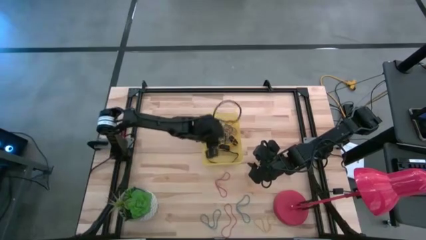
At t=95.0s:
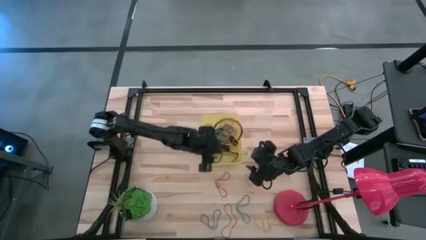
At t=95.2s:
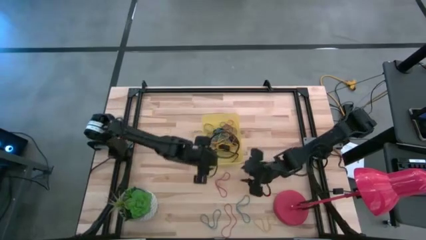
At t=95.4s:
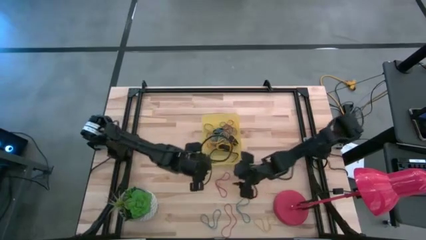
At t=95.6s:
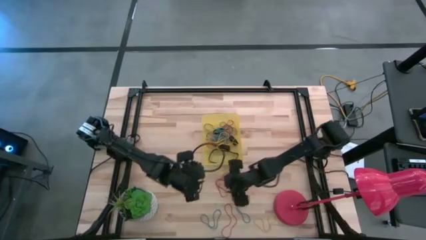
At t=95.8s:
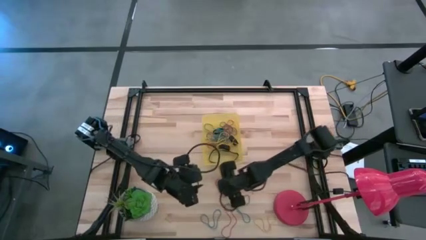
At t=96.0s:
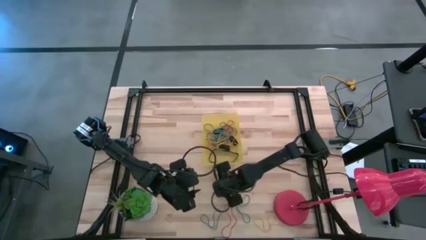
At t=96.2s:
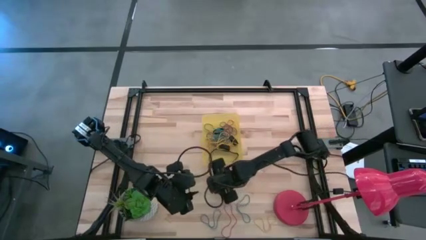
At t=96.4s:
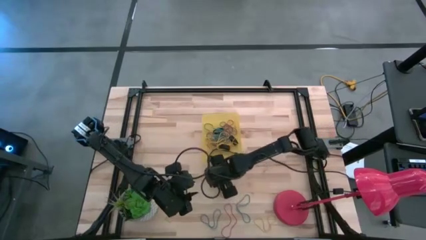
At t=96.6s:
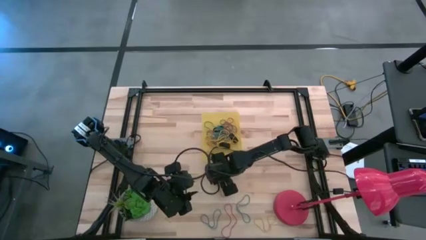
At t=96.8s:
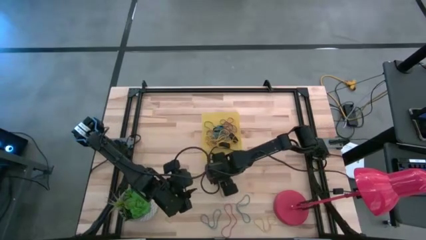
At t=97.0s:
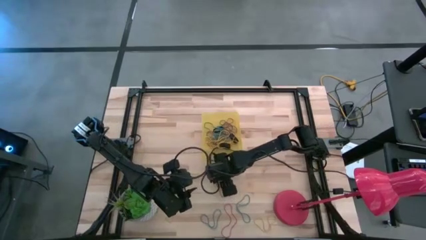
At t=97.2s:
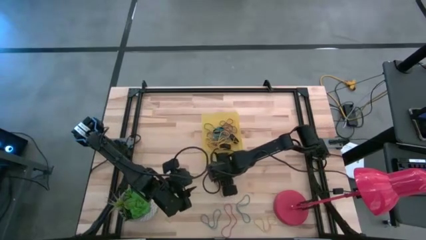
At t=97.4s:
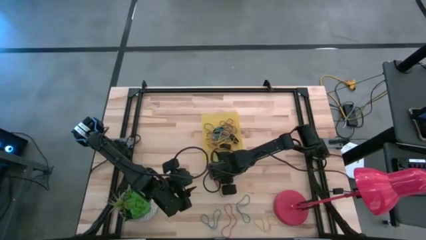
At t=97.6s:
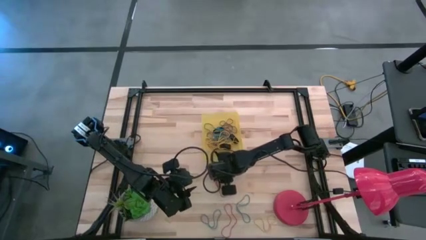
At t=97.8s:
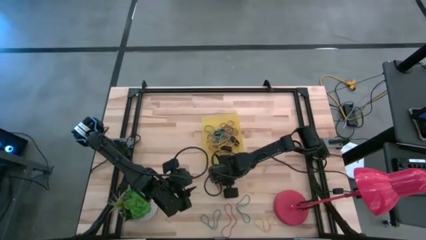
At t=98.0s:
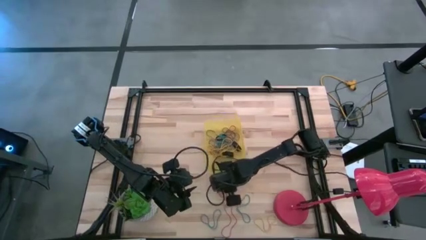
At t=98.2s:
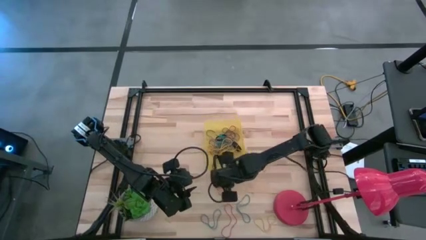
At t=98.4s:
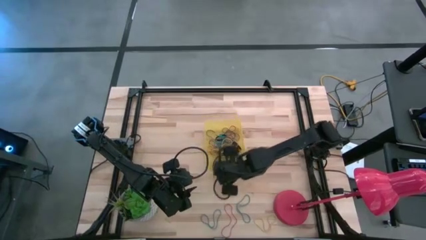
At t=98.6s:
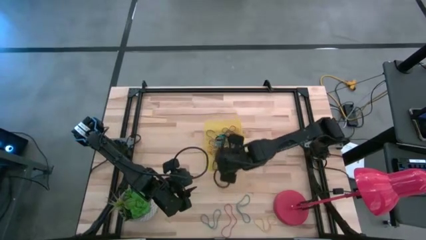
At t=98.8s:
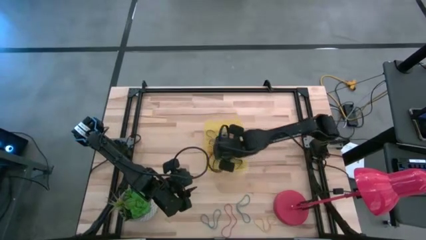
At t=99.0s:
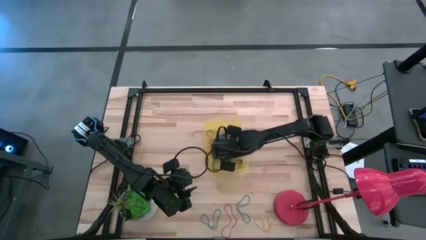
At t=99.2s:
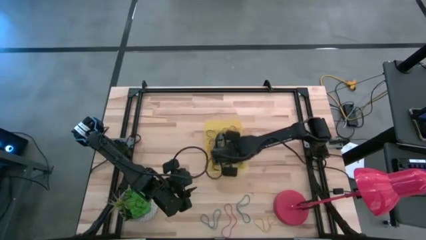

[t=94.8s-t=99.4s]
Task: Pick and place rubber bands into bin
Put the top red rubber band into the yellow bin

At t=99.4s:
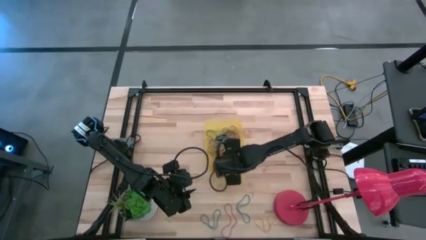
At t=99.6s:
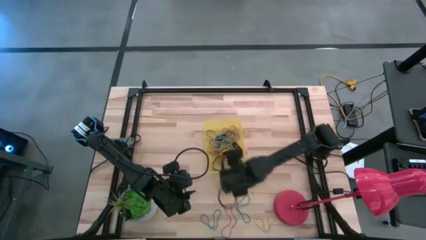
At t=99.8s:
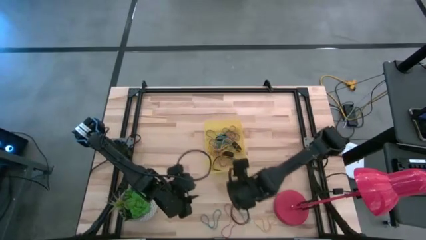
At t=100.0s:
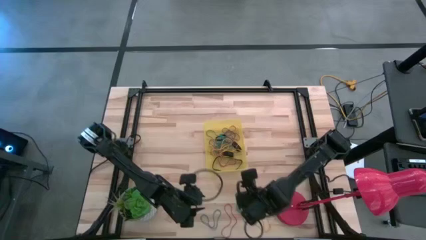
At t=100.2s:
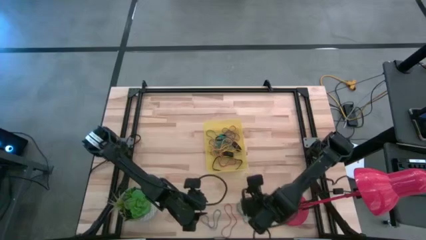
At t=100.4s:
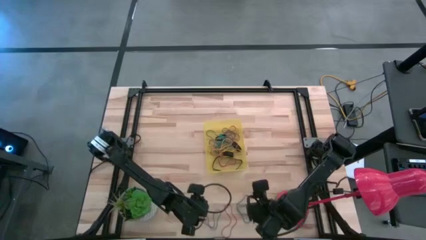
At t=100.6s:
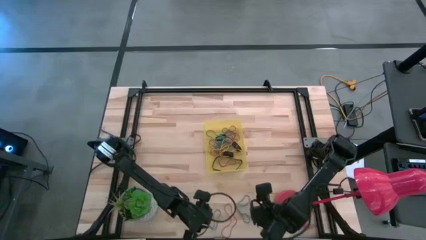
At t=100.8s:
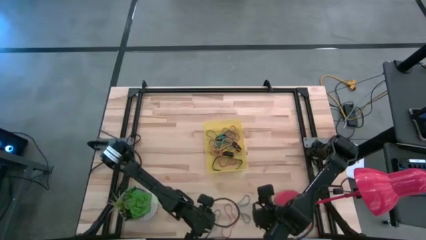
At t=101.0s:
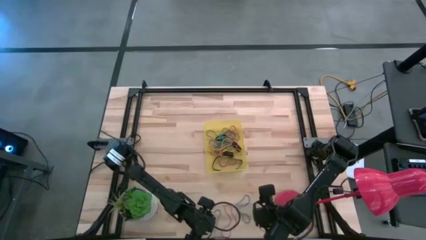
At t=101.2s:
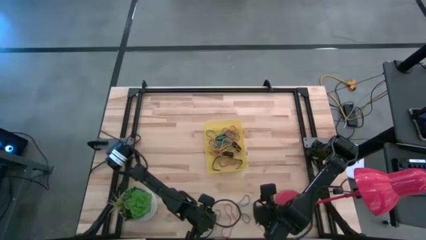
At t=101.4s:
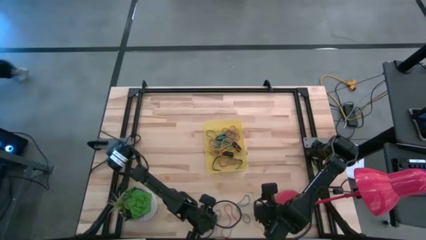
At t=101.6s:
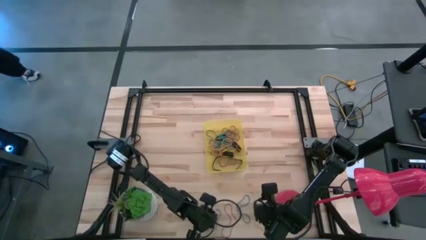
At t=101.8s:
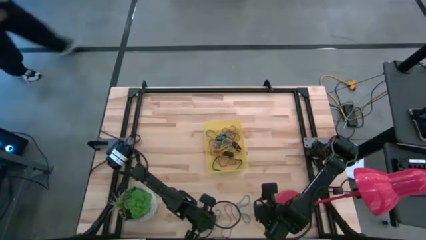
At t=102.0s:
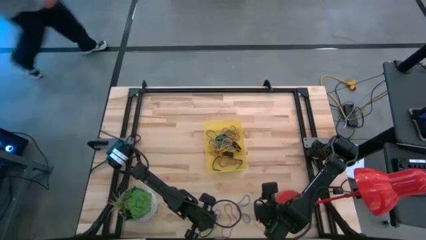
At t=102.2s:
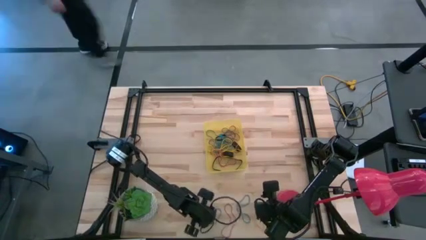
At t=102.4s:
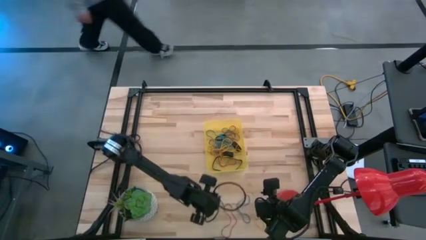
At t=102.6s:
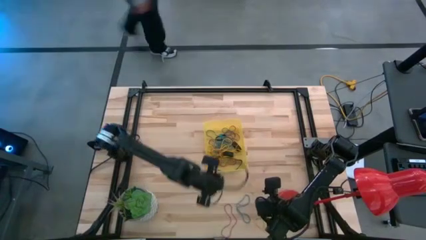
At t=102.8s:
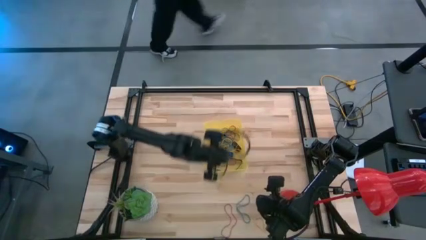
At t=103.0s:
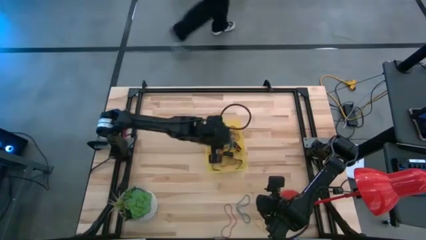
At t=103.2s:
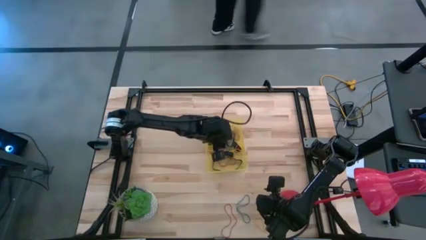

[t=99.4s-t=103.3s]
Put the left blue rubber band into the yellow bin

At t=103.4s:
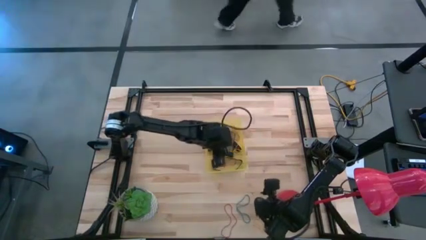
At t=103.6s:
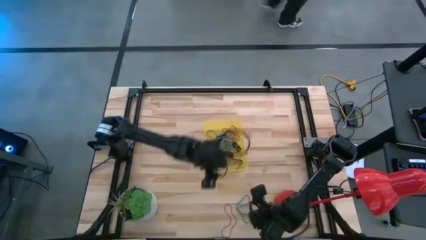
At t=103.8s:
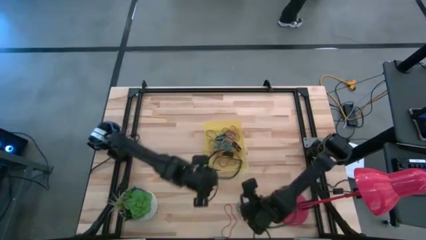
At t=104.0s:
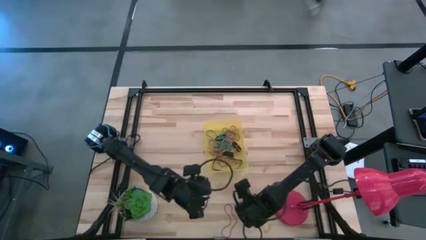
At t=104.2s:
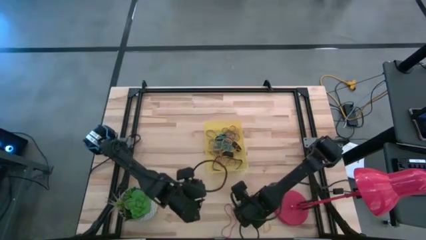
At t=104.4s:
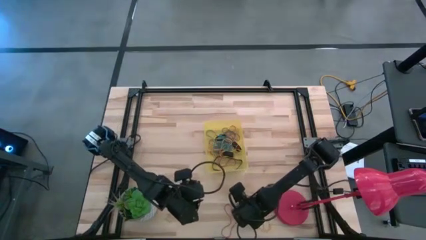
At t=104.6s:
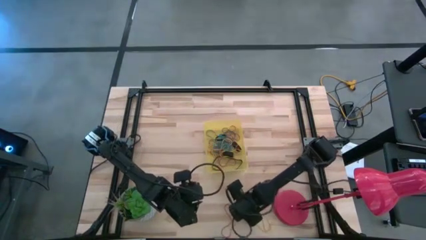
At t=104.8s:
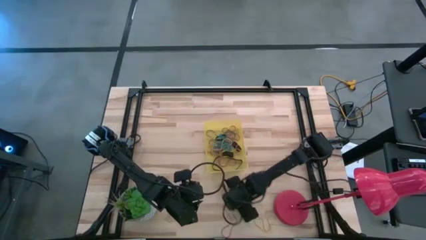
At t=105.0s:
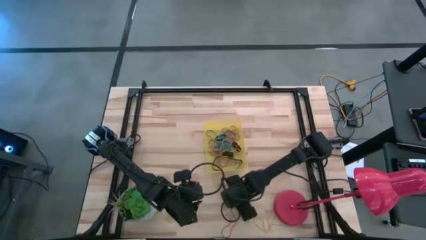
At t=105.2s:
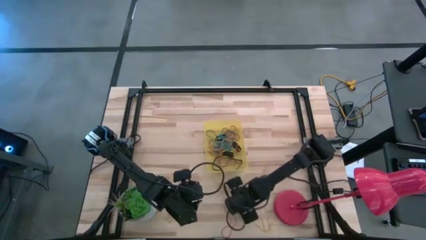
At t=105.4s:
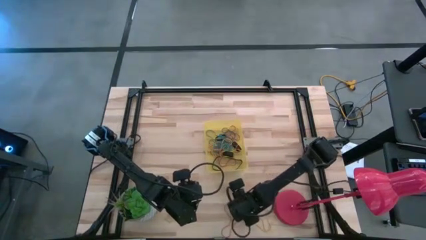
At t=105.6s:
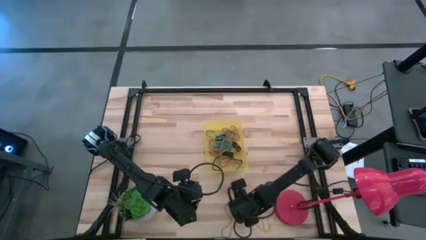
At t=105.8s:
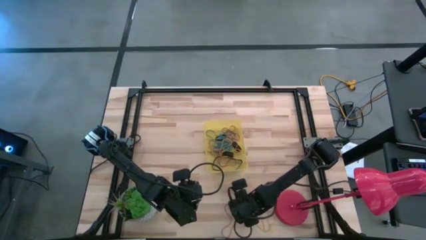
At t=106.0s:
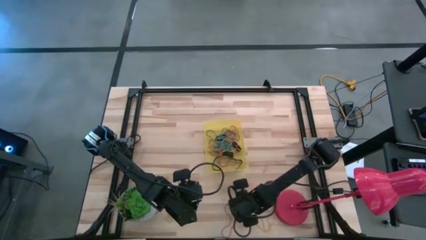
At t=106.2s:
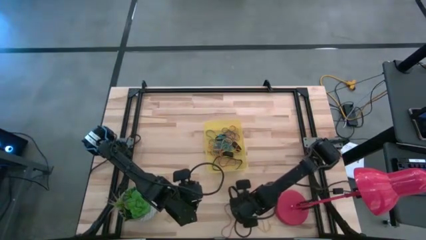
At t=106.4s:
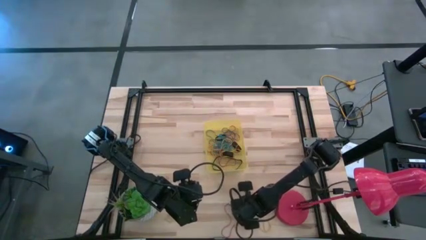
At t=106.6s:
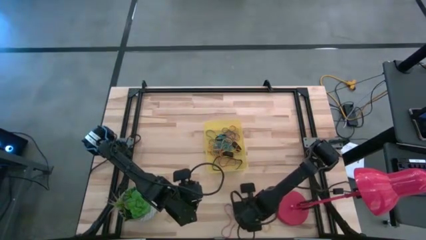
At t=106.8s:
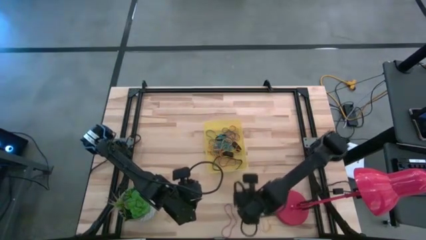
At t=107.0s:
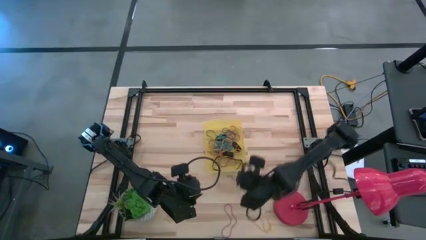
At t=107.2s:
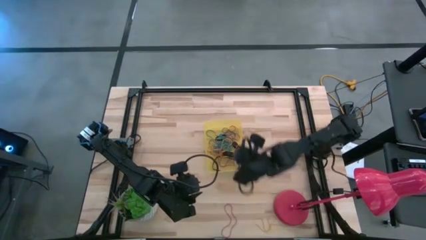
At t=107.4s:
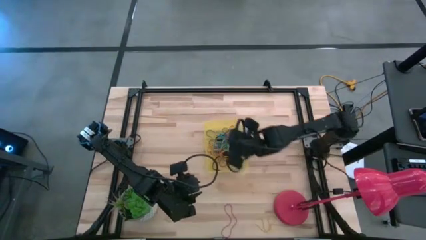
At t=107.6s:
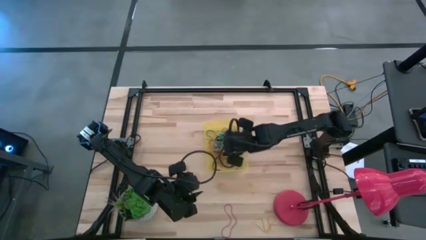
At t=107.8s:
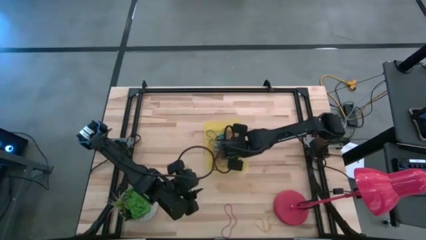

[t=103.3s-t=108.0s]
Put the blue rubber band into the yellow bin

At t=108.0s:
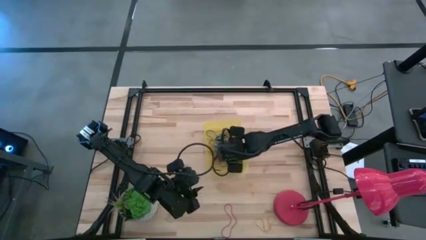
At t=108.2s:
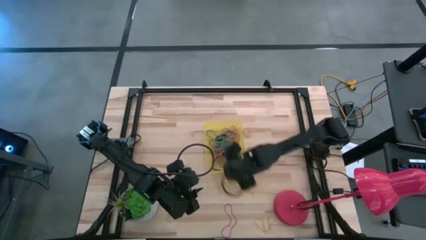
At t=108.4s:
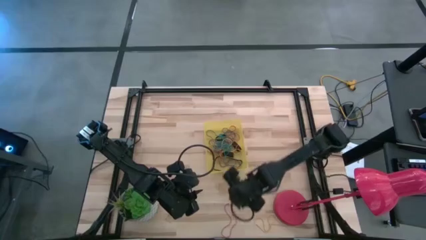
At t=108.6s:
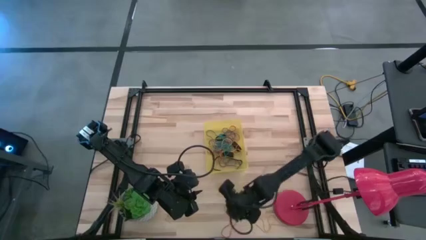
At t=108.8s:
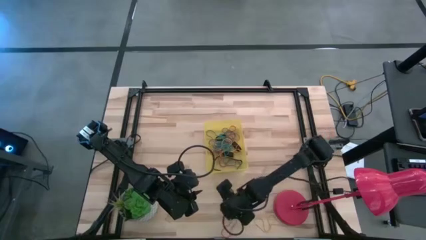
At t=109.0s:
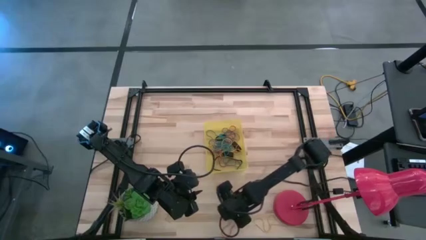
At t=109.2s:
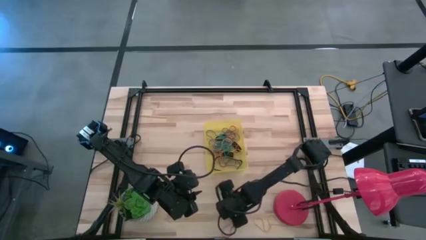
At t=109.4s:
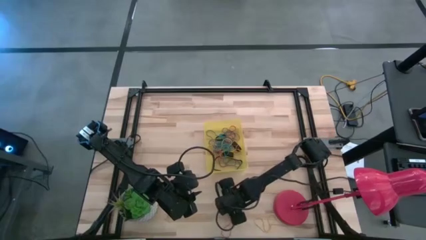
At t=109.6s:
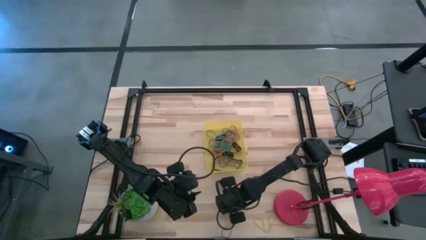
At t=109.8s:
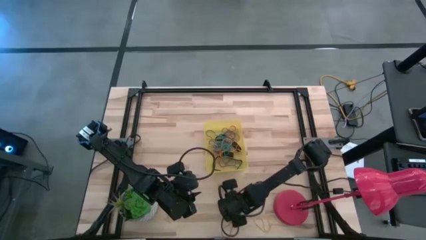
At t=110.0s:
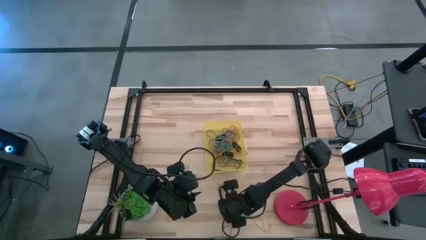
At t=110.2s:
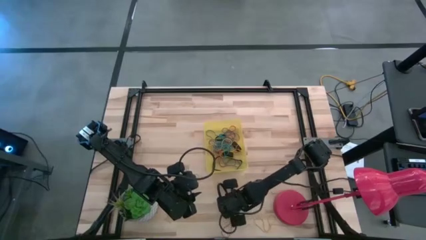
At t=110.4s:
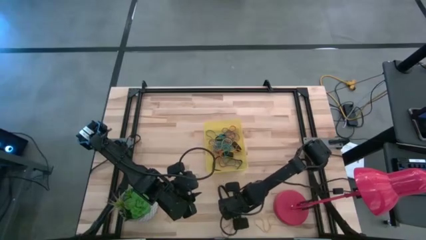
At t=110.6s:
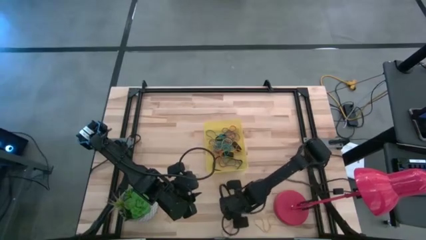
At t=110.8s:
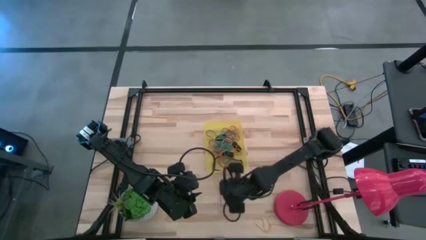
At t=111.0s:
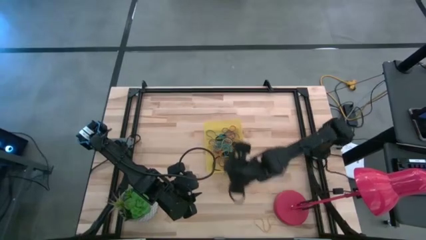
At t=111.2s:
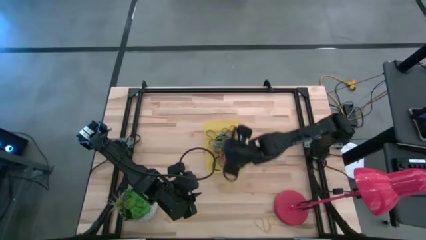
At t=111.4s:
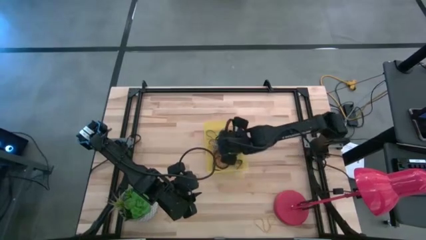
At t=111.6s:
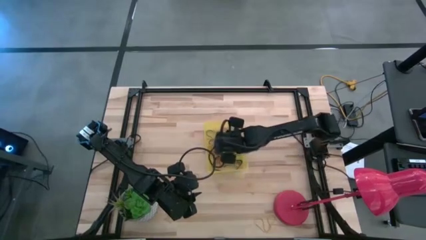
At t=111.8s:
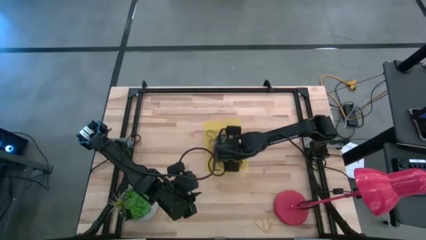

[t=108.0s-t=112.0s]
Put the red rubber band into the yellow bin

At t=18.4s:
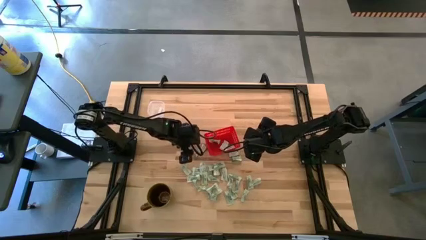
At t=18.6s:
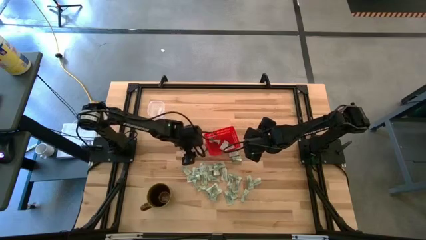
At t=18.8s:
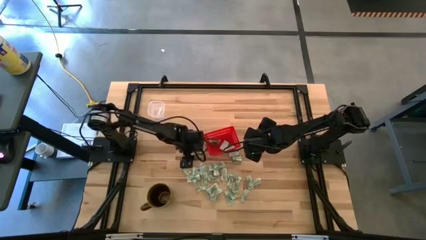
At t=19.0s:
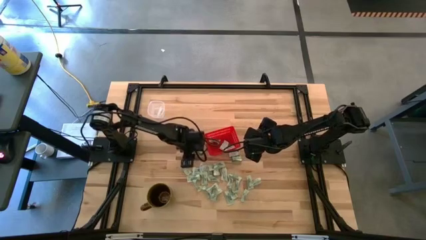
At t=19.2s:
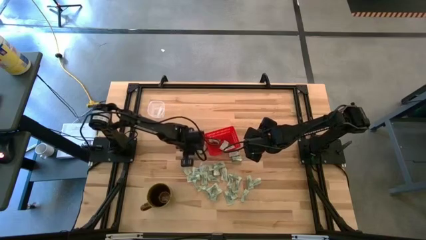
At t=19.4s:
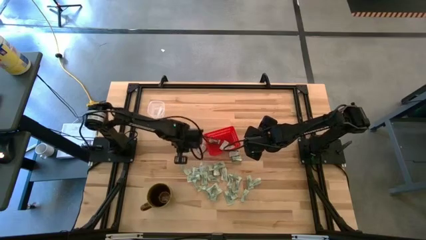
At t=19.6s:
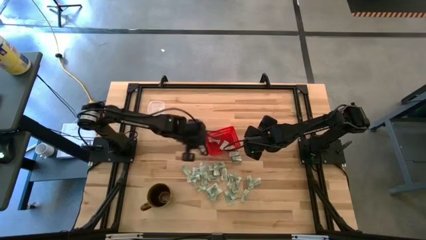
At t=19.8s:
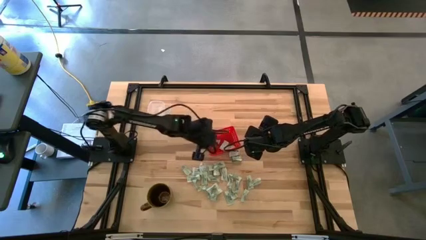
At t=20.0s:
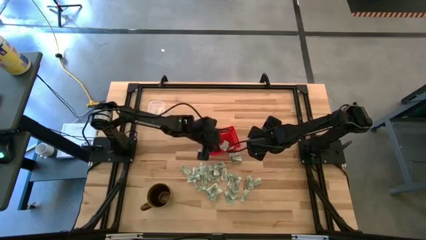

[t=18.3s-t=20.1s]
Task: Pick and place items into bin
Put the white truvia packet into the red bin
